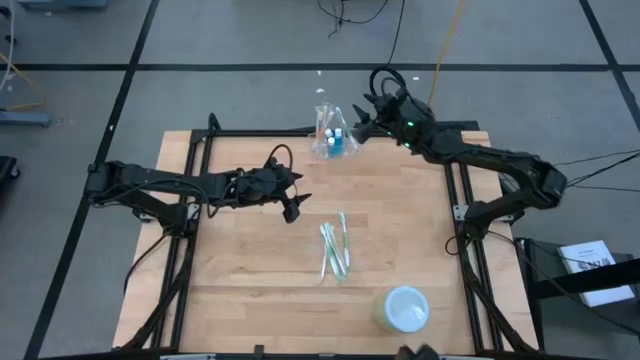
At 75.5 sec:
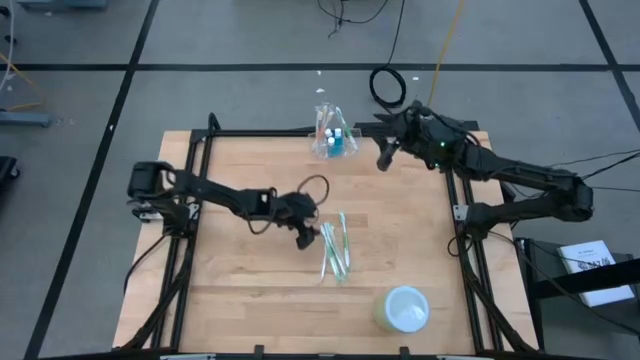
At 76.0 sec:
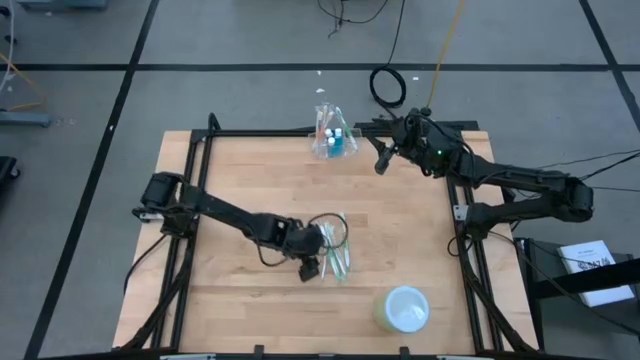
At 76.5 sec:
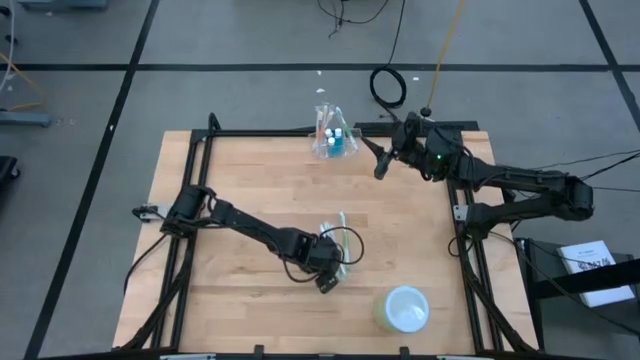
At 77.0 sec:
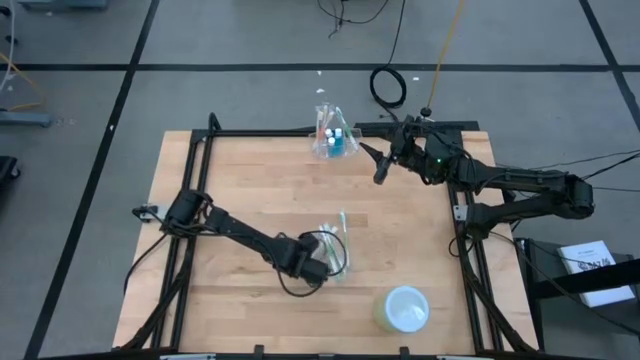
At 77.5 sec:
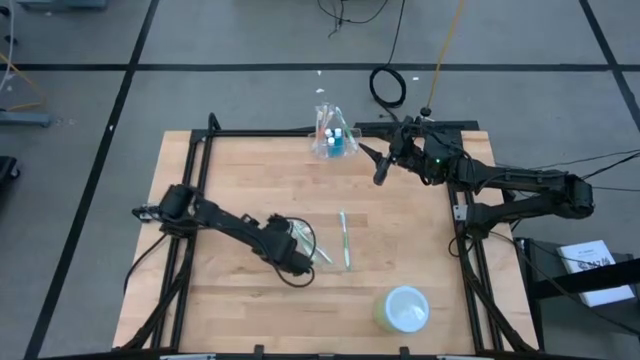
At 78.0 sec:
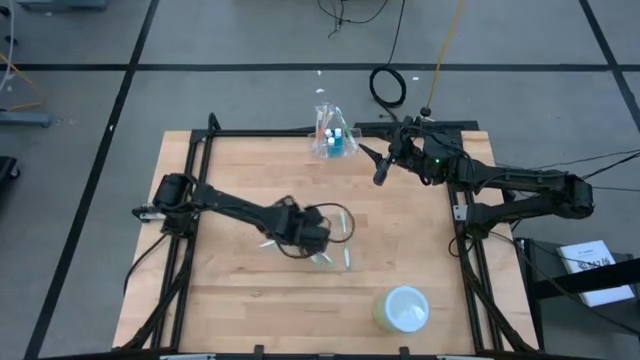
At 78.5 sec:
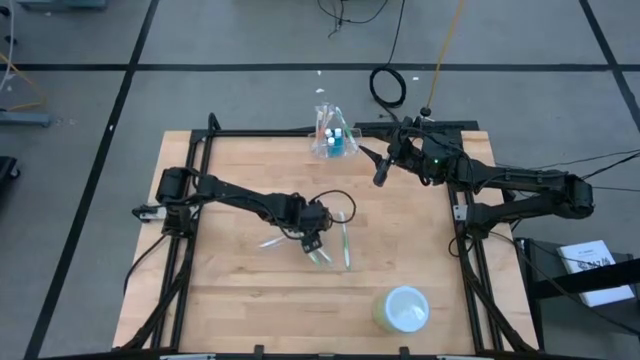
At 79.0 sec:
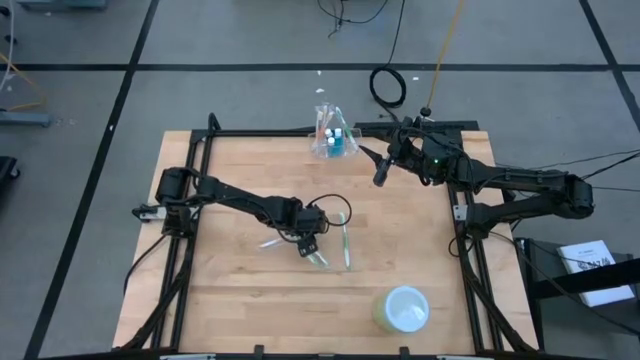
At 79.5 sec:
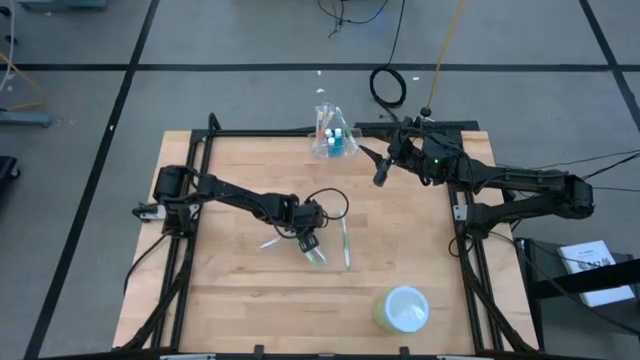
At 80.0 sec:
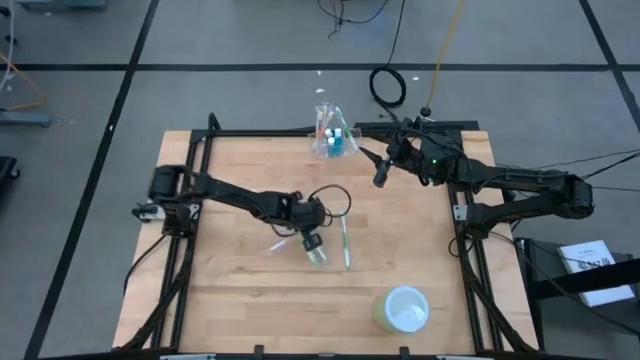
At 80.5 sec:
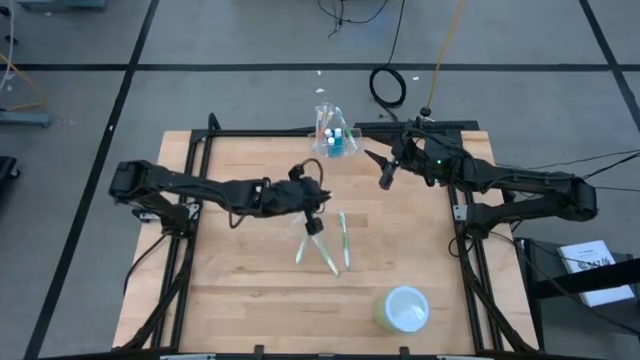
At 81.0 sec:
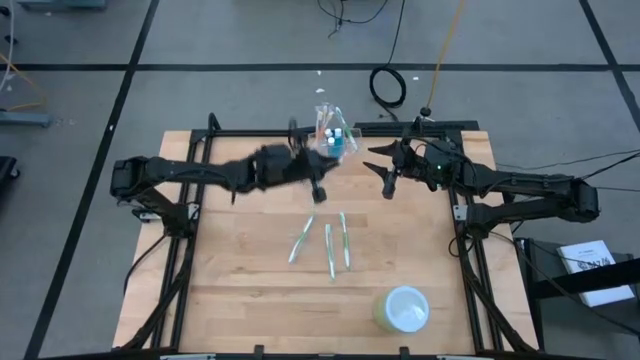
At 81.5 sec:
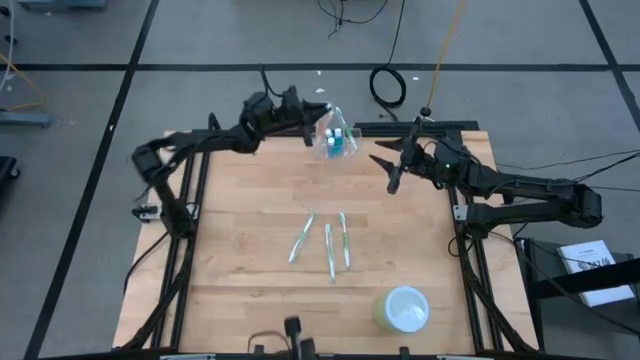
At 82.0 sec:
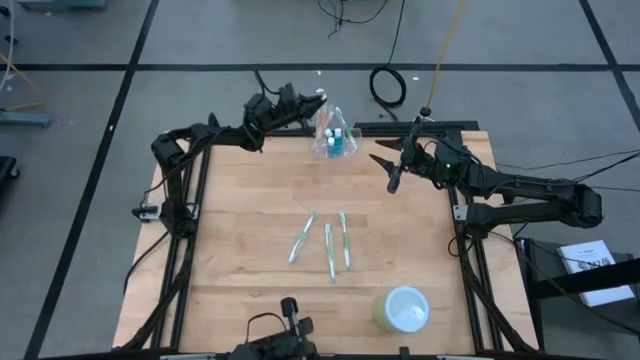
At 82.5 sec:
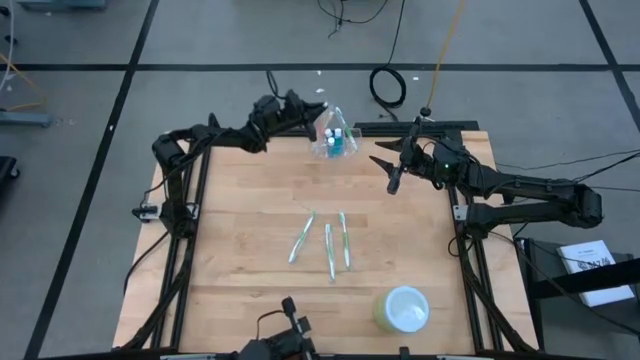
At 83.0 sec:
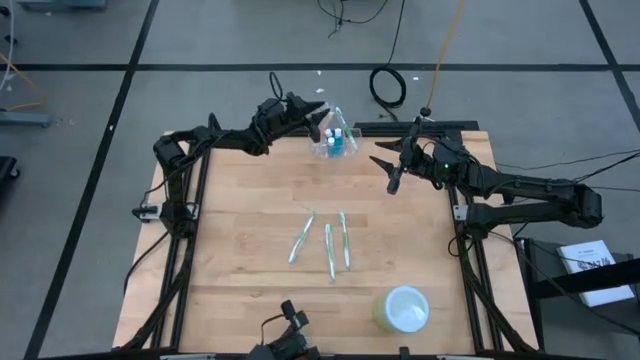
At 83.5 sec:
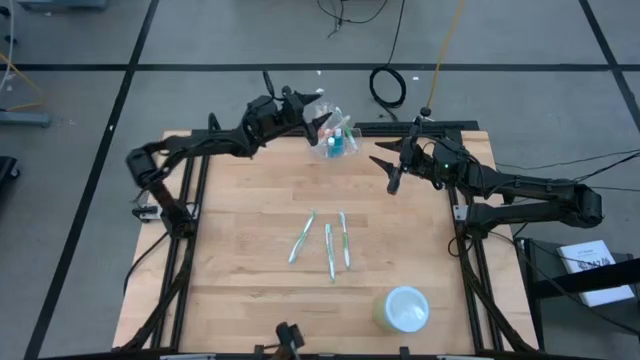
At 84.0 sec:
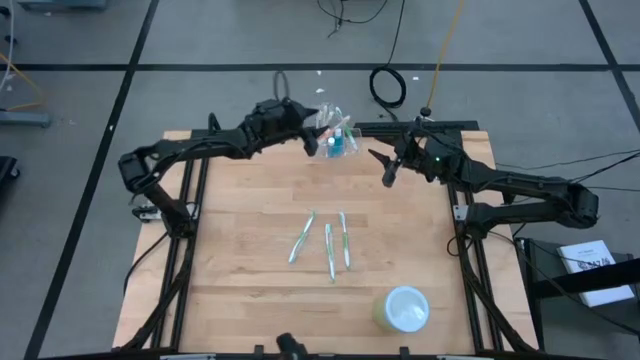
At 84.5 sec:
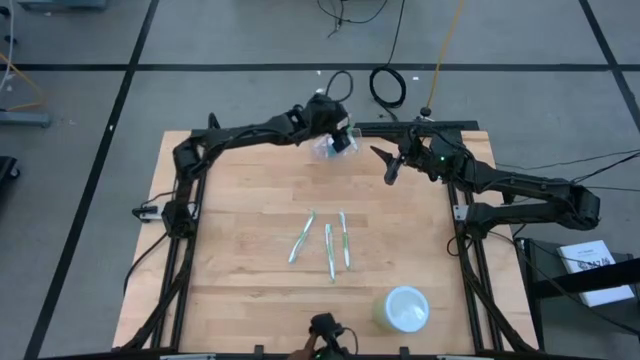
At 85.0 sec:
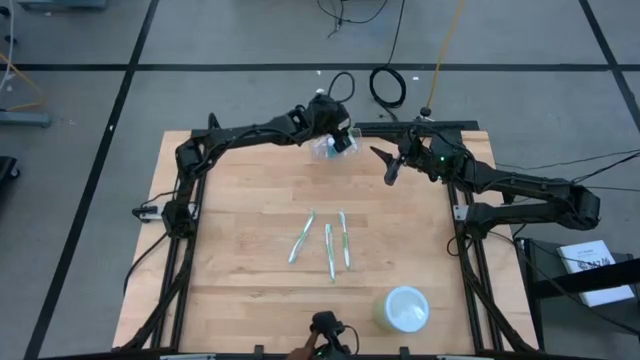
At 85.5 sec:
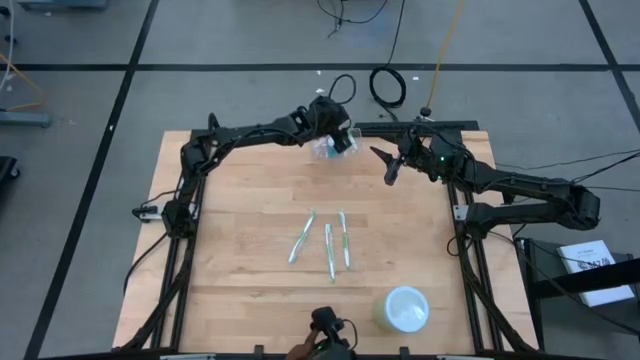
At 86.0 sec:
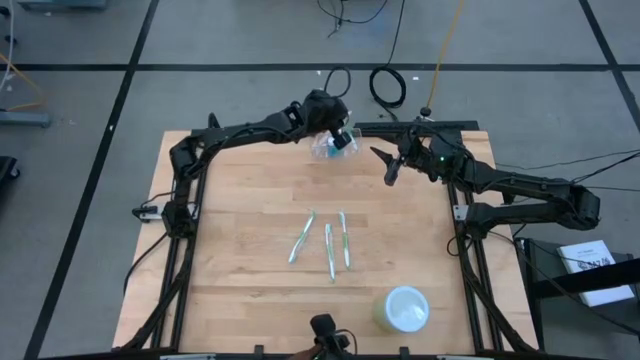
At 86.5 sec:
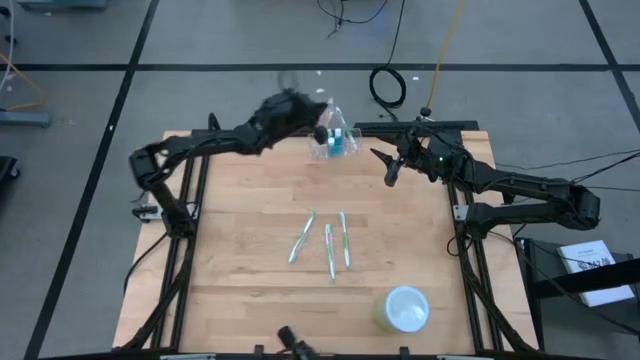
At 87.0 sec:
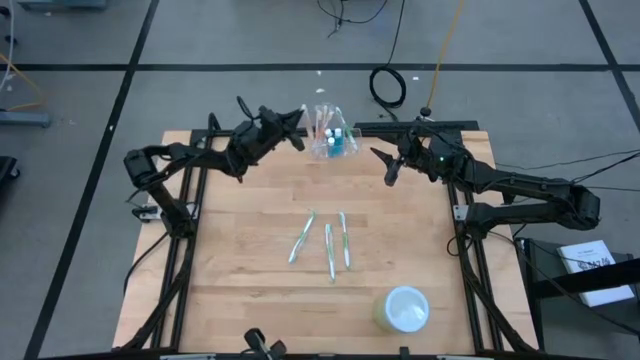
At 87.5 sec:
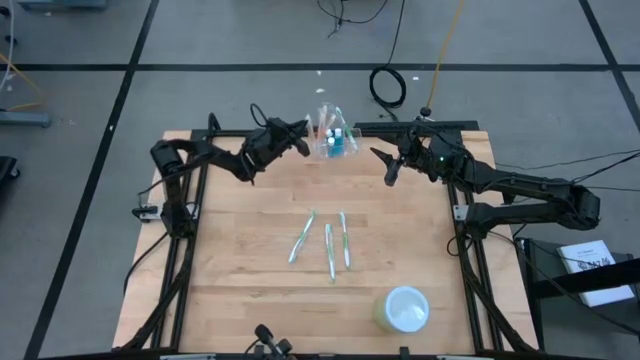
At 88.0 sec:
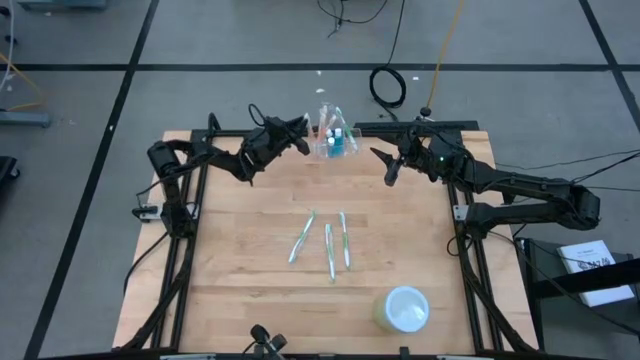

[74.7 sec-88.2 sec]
Task: Pick & Place toothbrushing station
Put the orange toothbrush into the transparent organizer

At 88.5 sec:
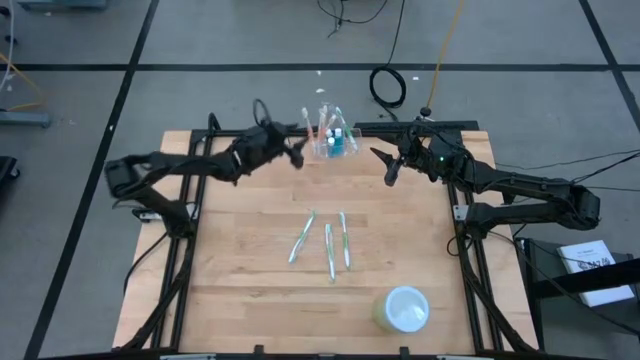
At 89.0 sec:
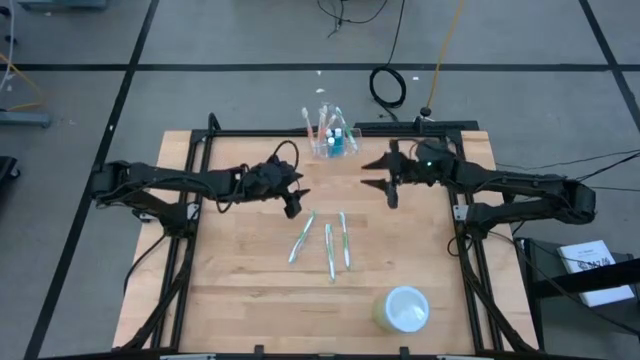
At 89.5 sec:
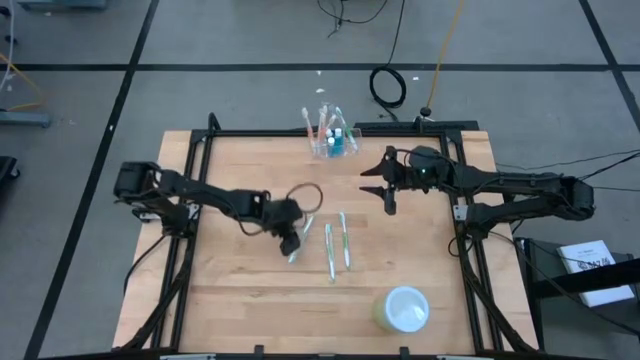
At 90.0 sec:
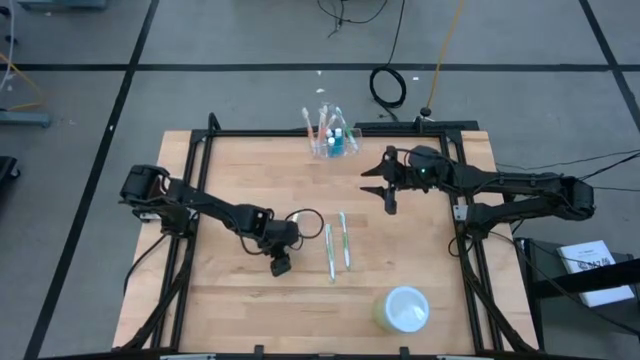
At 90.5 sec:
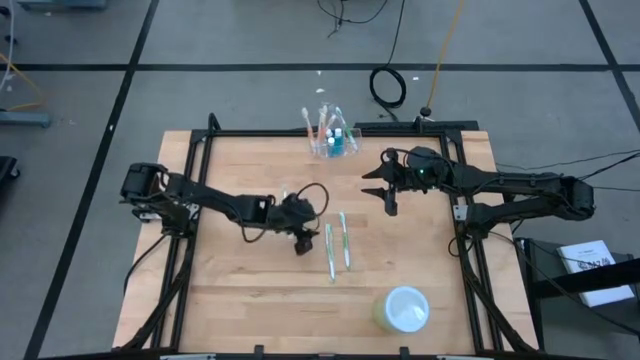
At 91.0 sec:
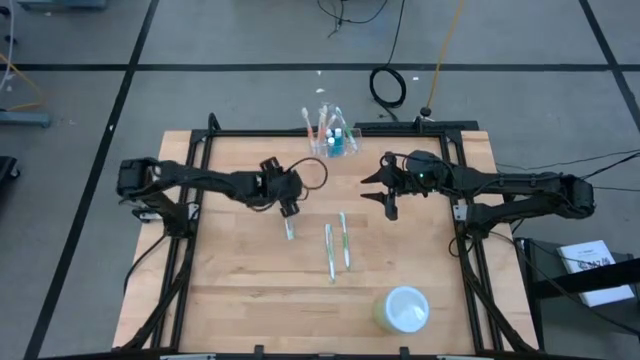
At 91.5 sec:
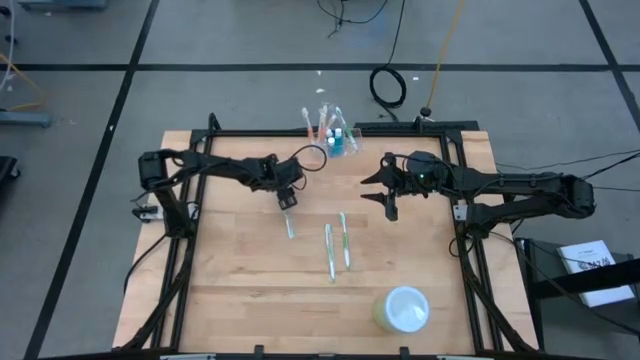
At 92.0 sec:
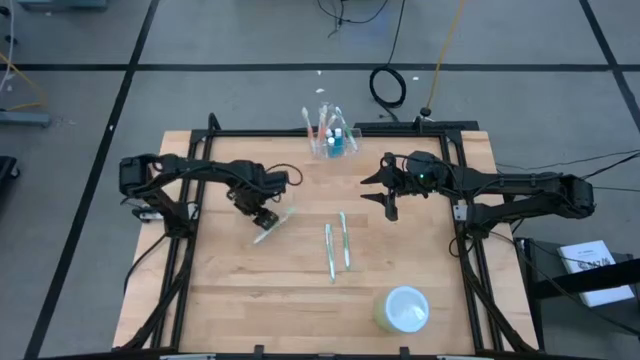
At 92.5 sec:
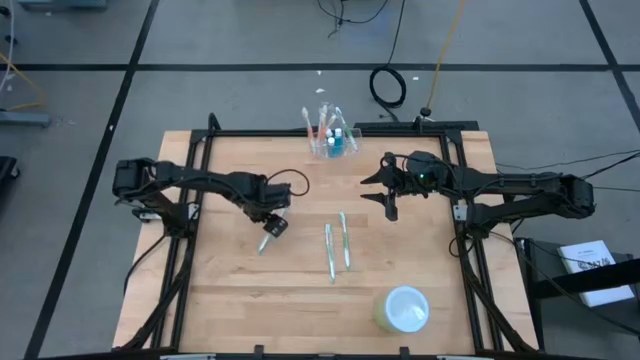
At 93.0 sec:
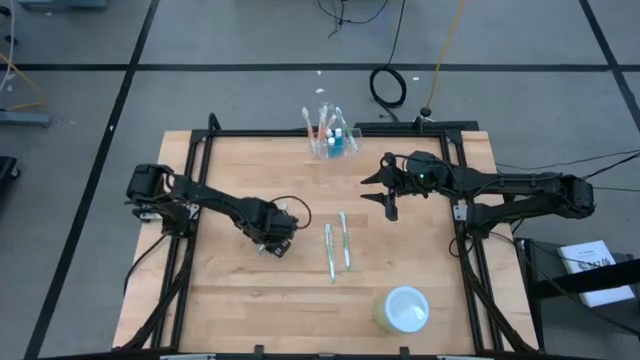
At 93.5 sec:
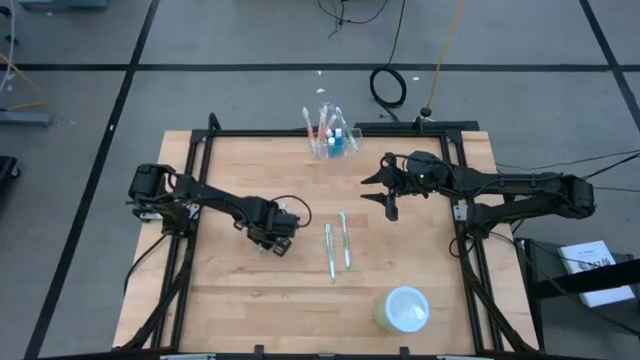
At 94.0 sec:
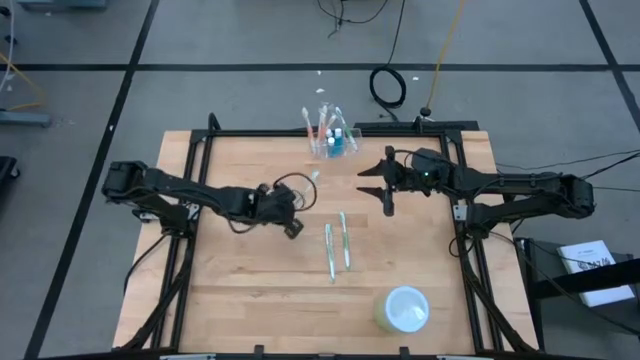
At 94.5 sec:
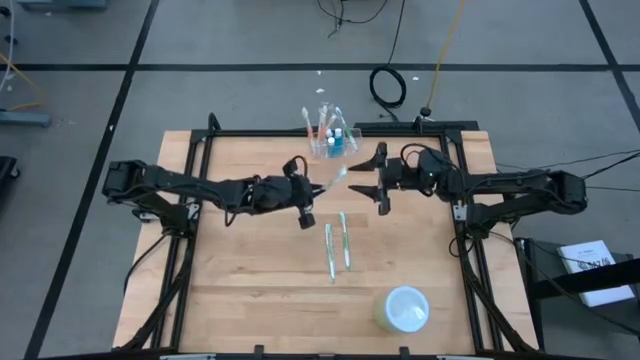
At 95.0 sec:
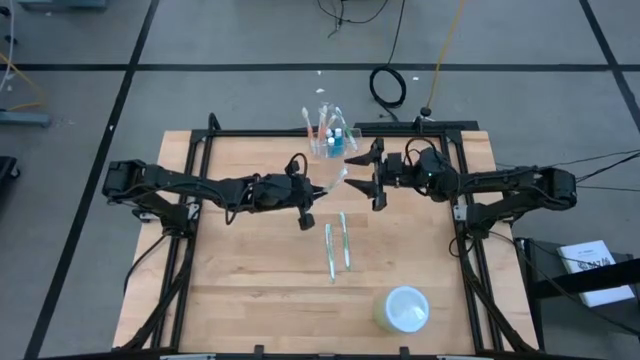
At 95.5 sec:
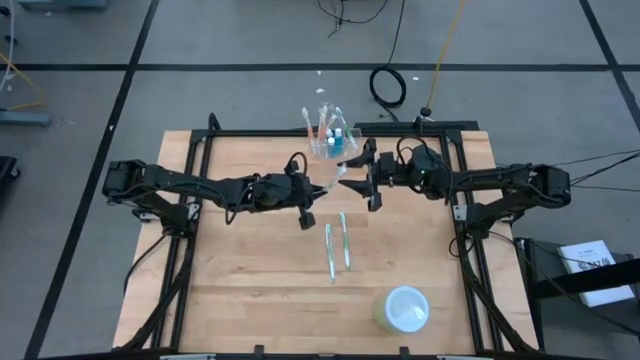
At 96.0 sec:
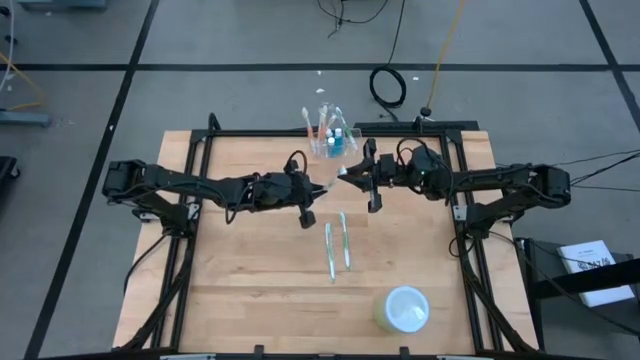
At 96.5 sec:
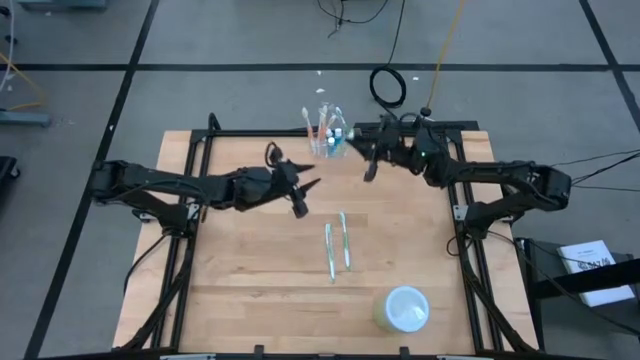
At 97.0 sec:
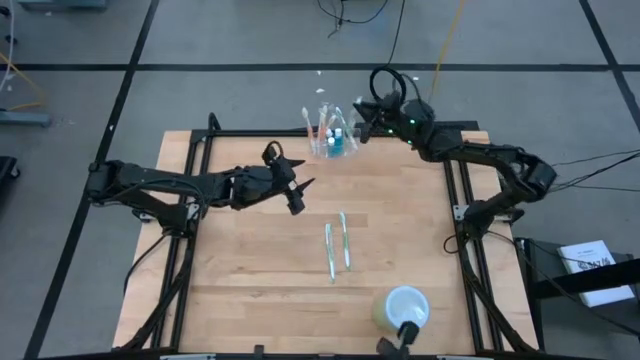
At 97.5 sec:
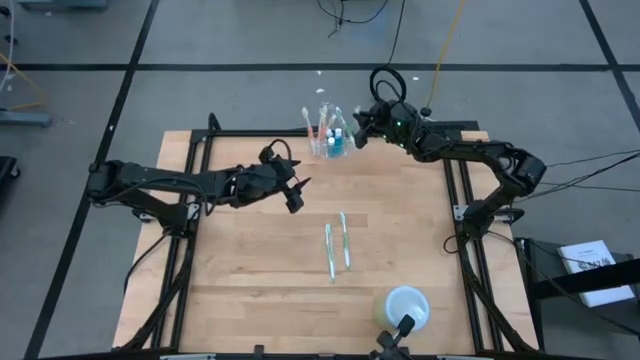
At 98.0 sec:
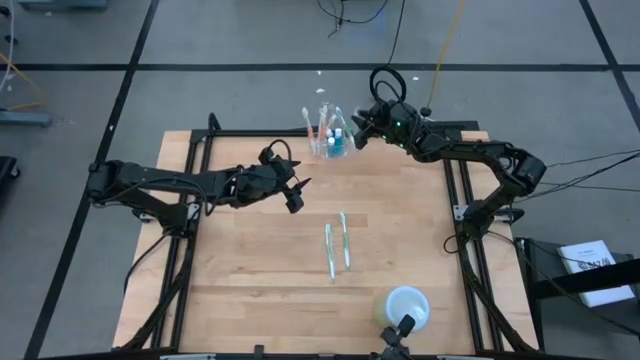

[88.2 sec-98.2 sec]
Put the green toothbrush into the transparent organizer
